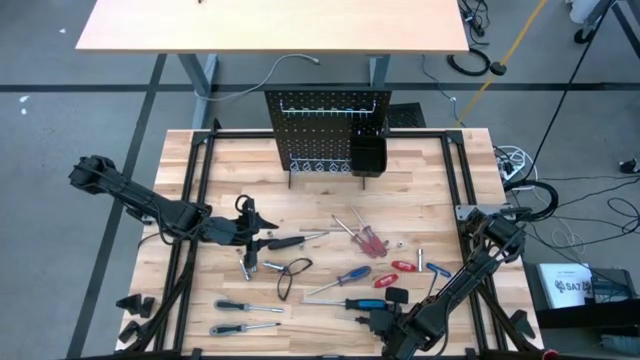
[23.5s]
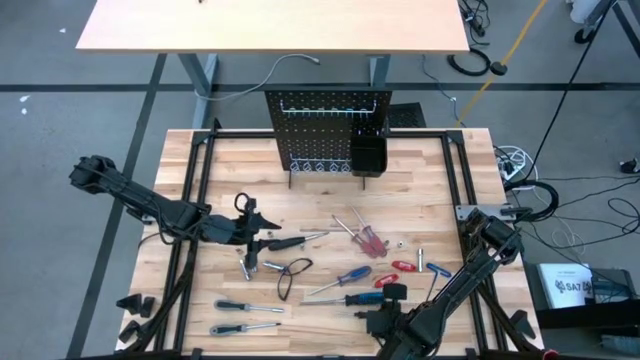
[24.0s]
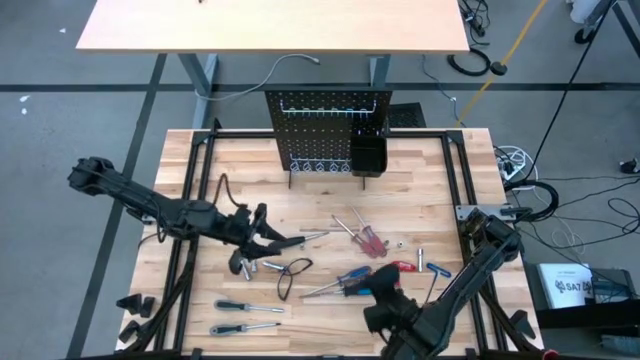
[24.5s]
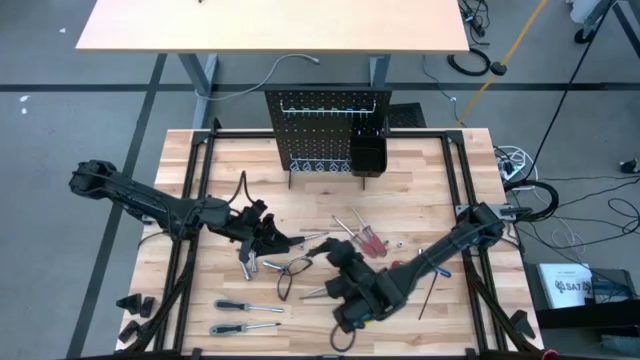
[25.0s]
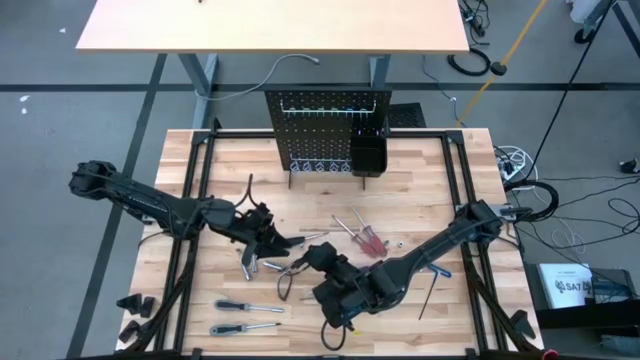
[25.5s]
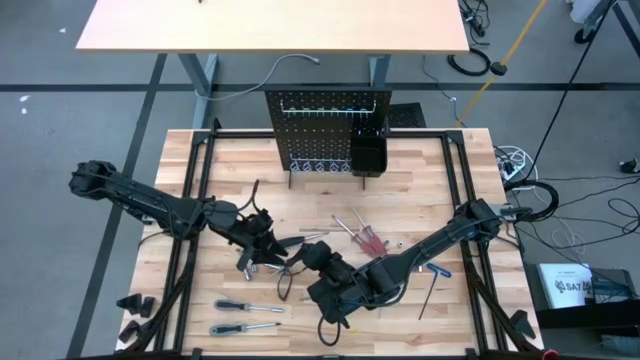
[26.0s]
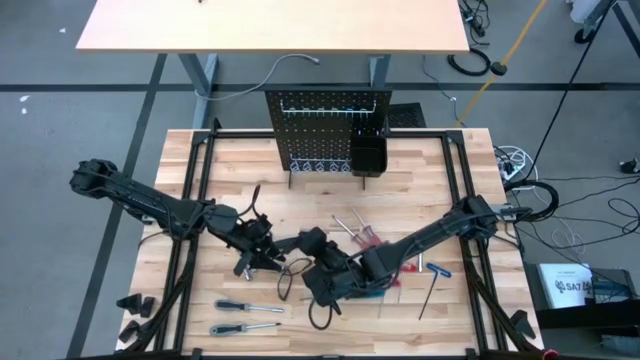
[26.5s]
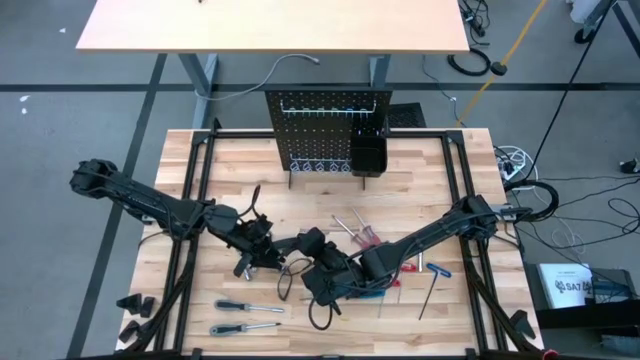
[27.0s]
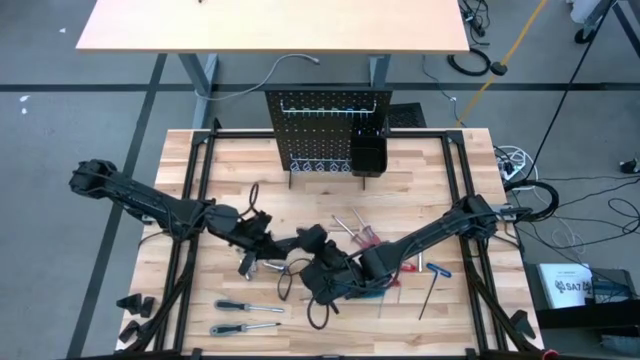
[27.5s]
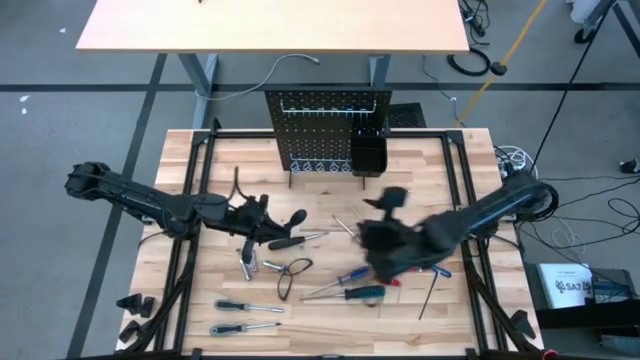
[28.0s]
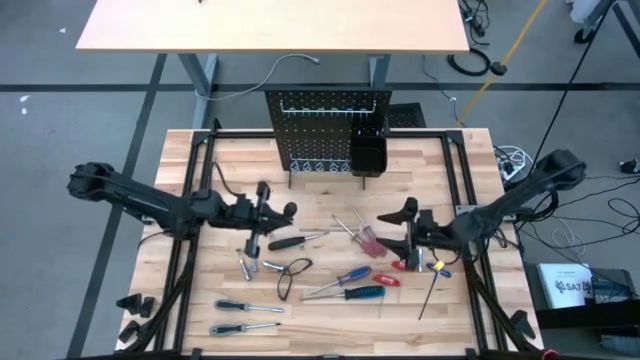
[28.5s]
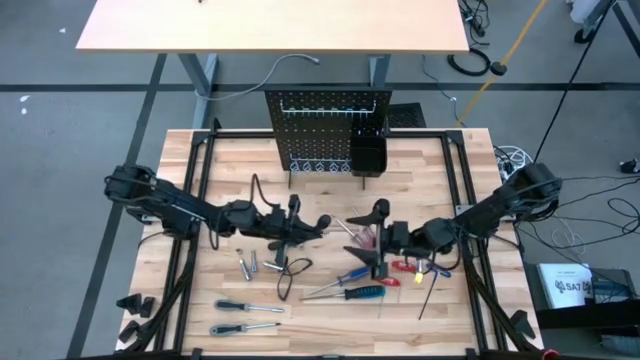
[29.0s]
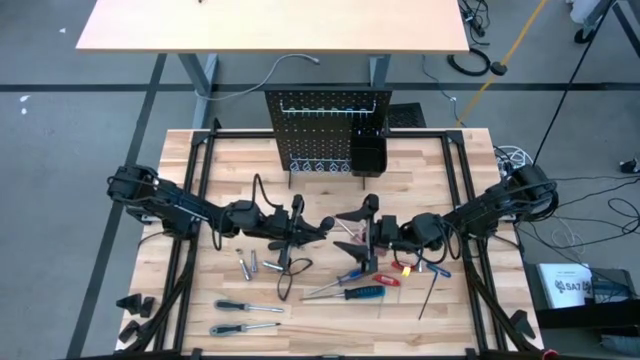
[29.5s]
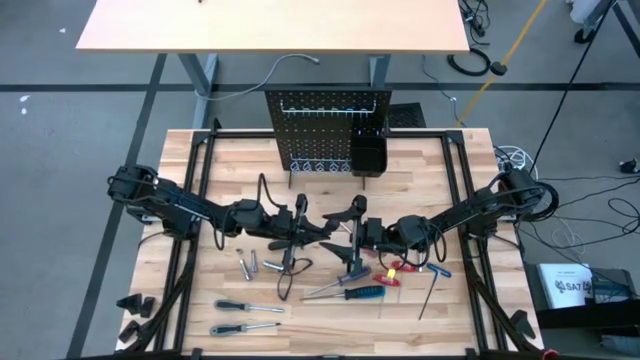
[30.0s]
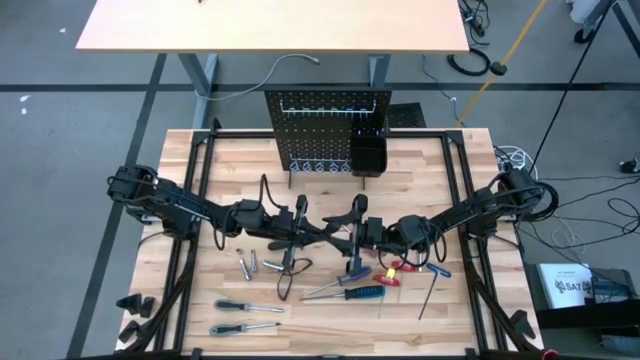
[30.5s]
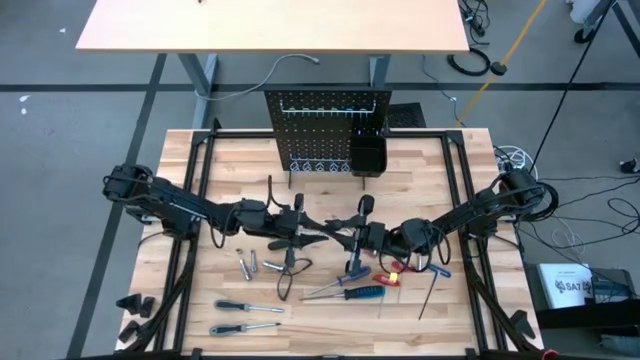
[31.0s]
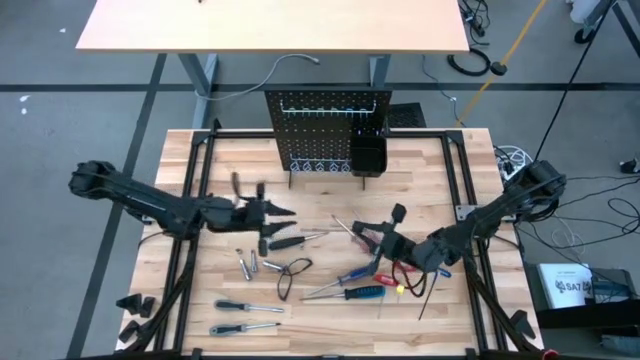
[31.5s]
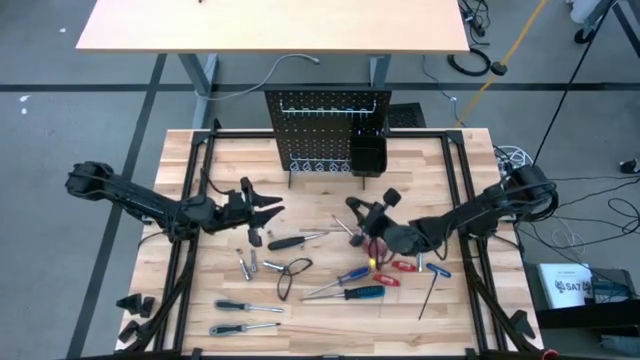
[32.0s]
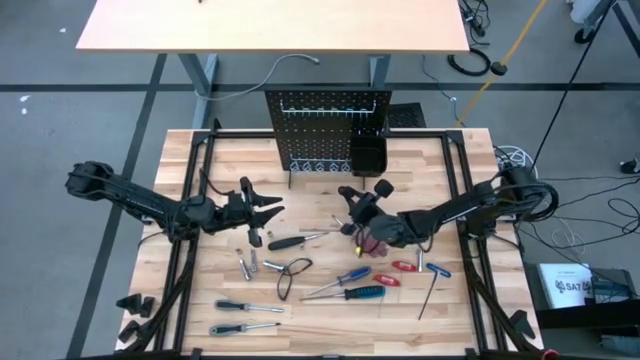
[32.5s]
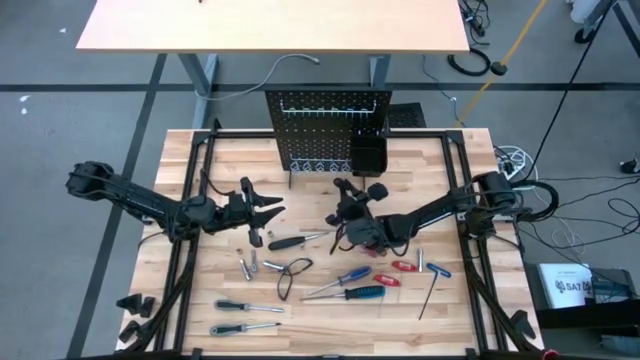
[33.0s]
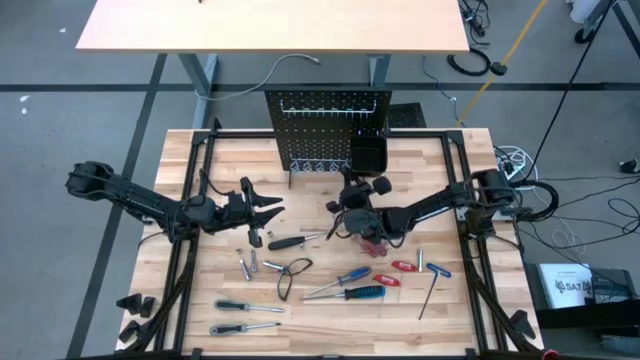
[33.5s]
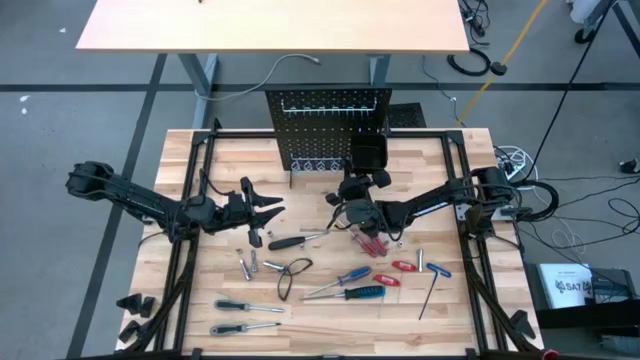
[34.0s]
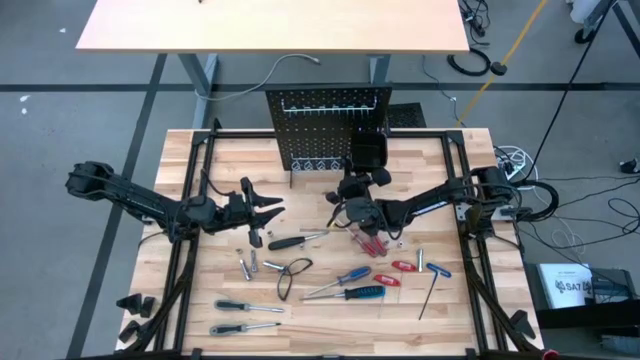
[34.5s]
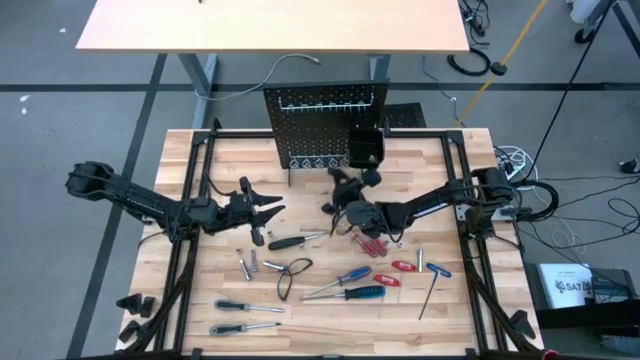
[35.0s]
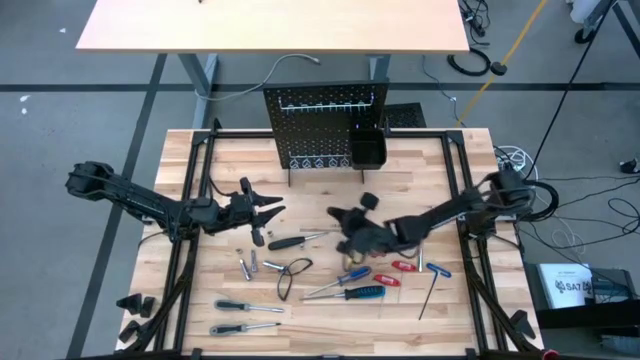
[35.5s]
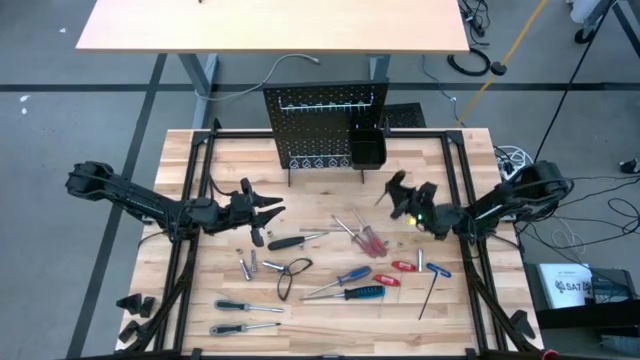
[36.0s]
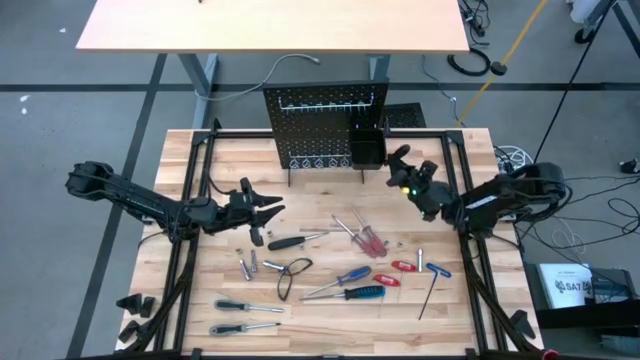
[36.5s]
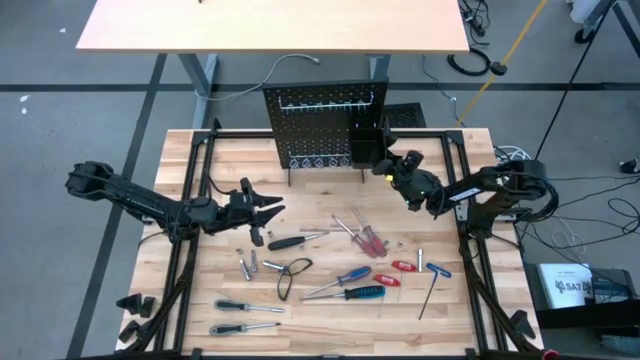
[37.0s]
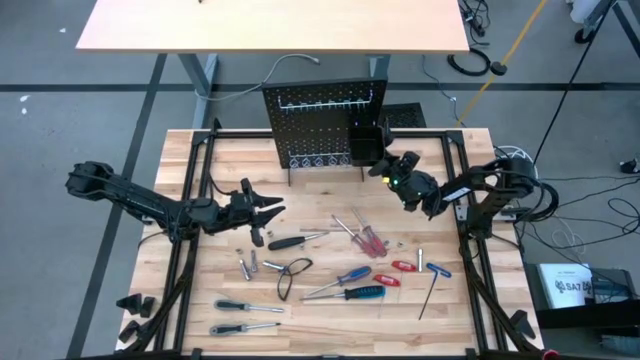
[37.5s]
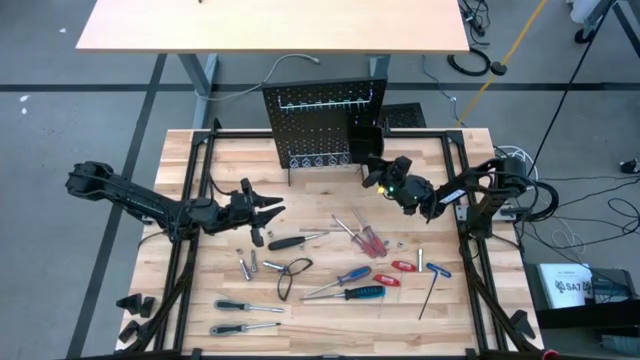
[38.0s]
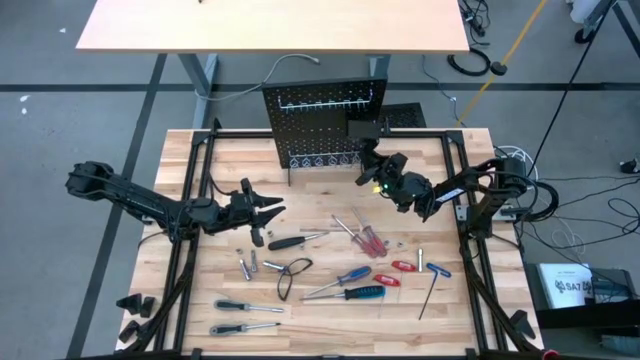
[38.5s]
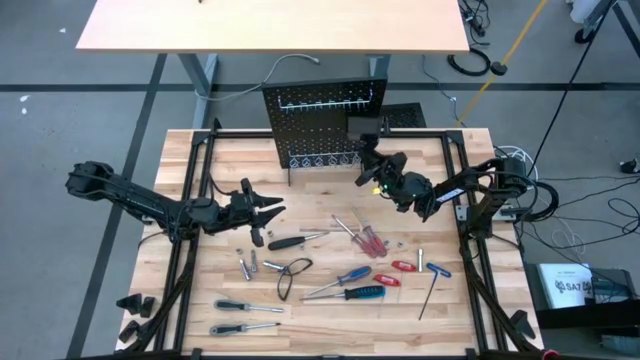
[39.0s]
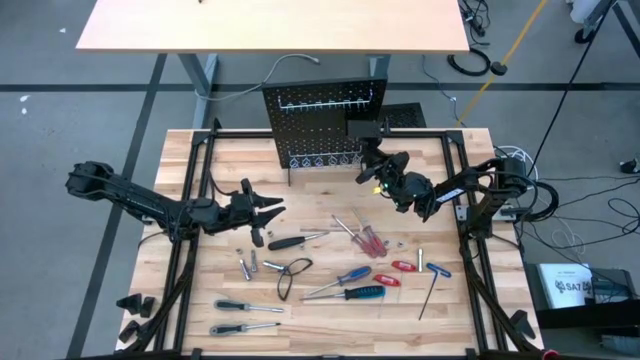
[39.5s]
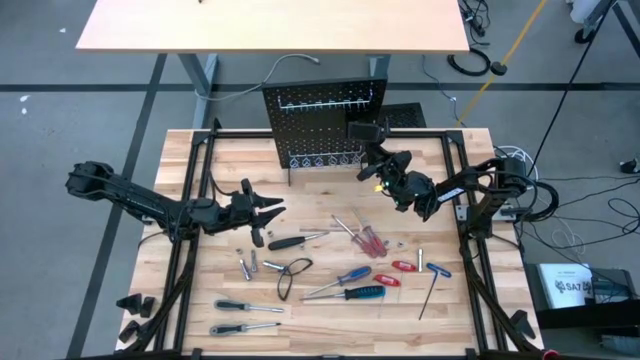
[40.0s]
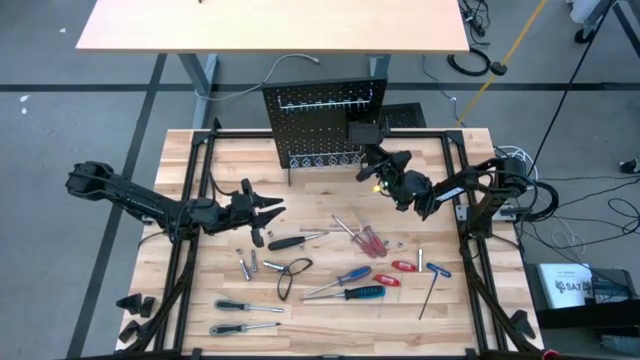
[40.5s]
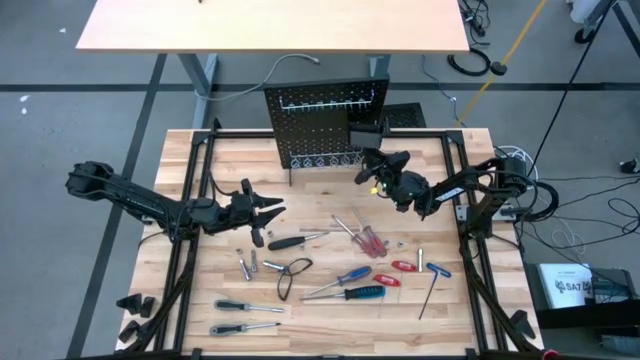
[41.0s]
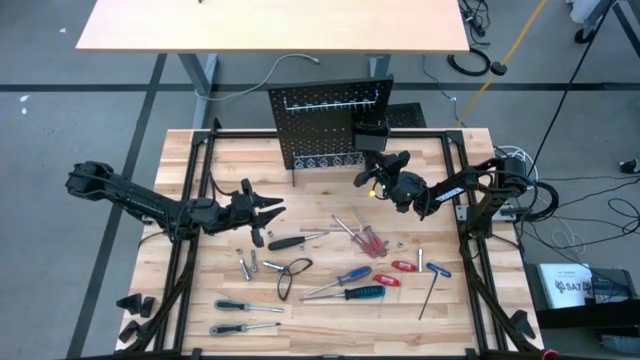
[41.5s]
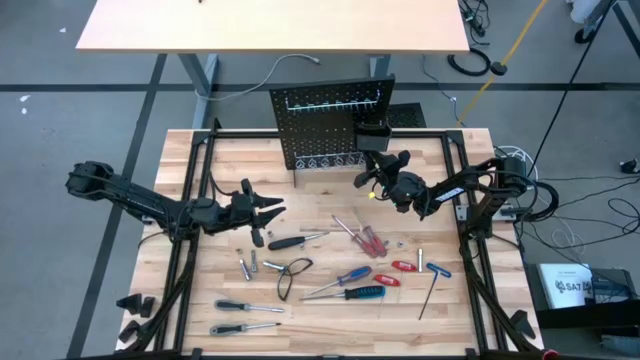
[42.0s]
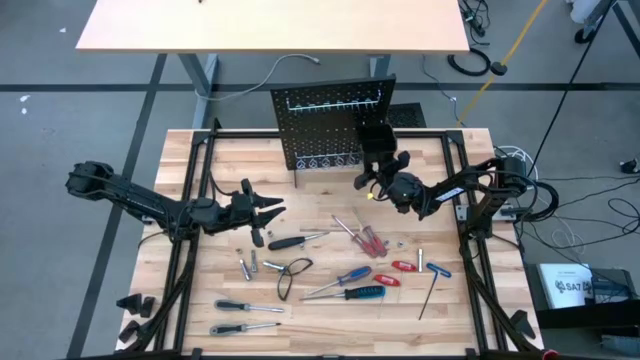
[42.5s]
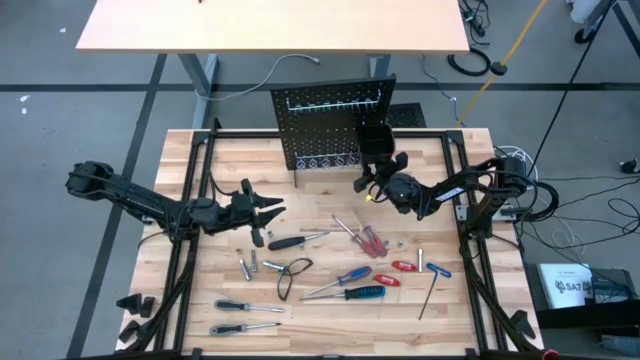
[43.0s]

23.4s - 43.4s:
Task: Hang tools onto peg board
Hang the bottom right black screwdriver on the peg board

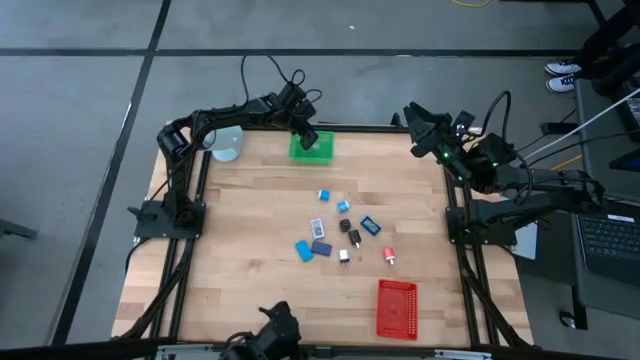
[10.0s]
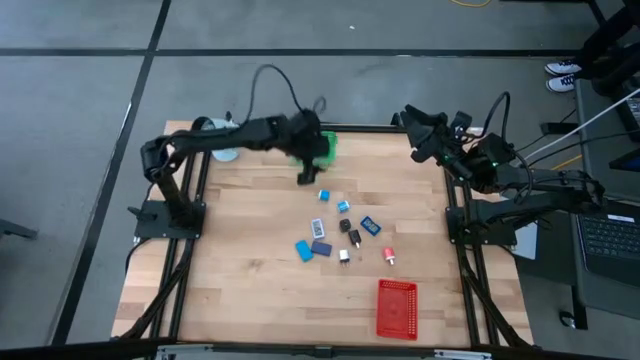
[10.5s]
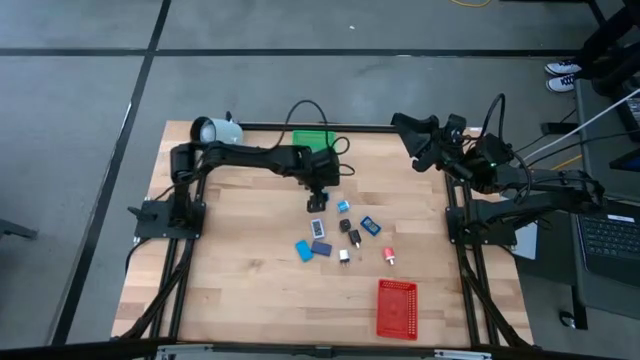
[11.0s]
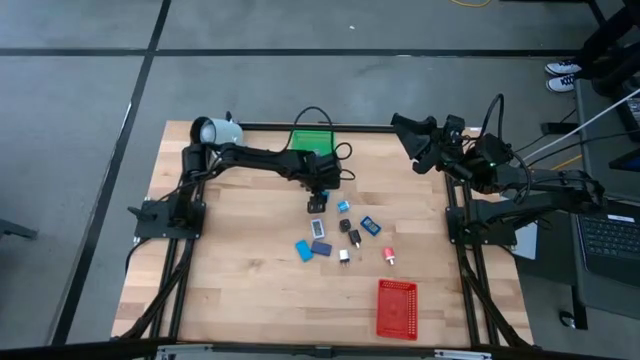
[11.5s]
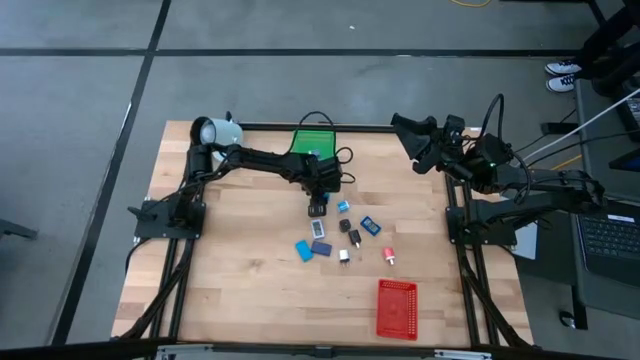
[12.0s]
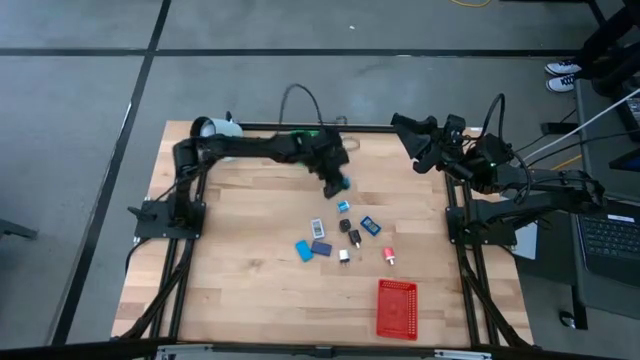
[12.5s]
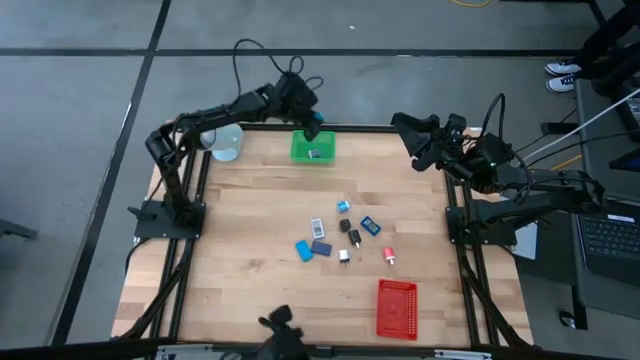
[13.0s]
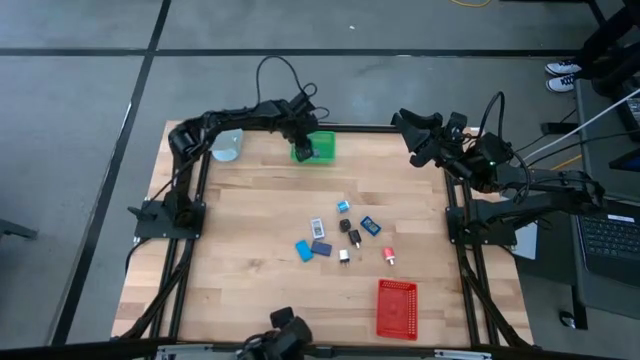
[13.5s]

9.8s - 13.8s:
Task: Pick & Place Office items
Put the left blue charger adapter into the green bin
